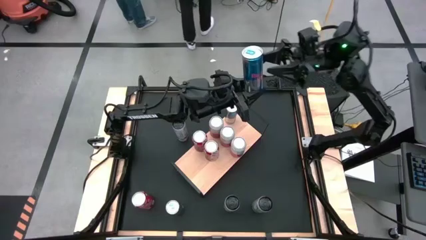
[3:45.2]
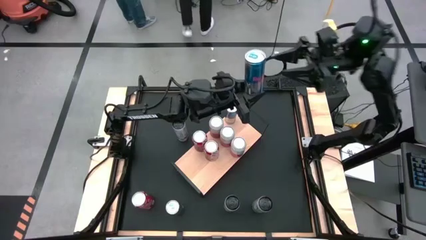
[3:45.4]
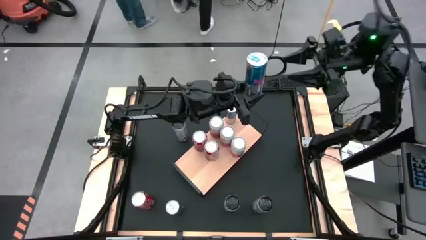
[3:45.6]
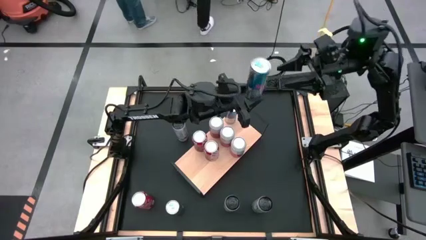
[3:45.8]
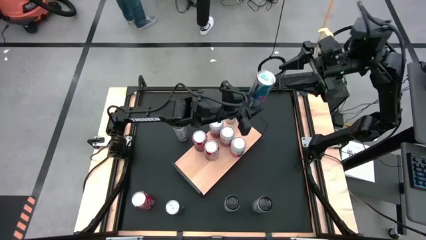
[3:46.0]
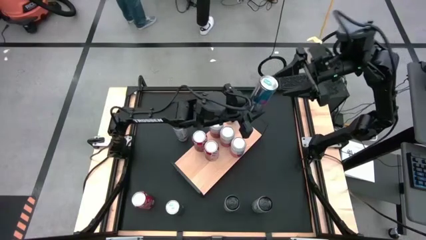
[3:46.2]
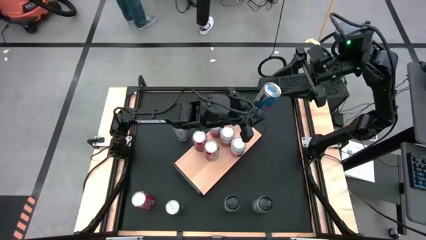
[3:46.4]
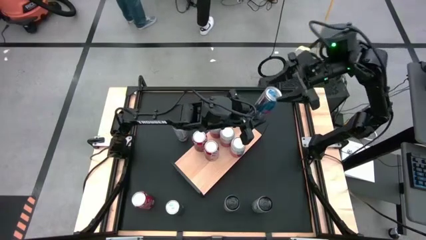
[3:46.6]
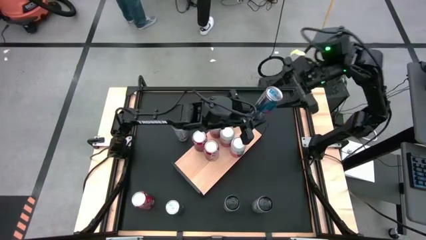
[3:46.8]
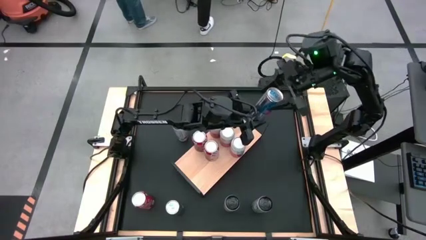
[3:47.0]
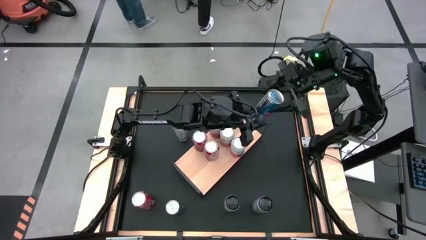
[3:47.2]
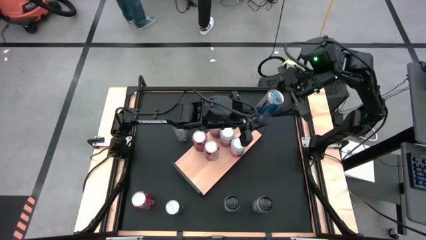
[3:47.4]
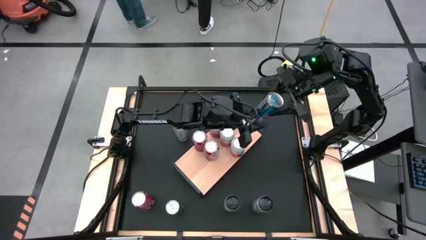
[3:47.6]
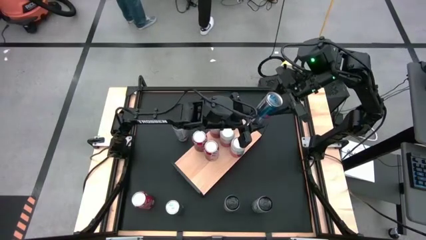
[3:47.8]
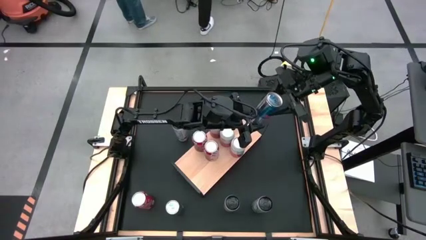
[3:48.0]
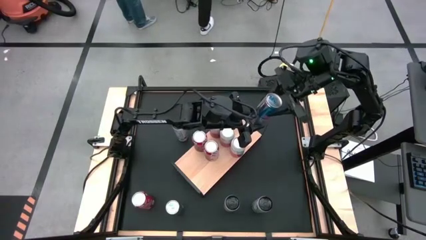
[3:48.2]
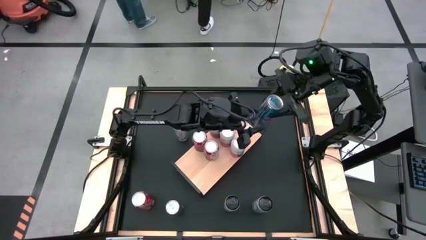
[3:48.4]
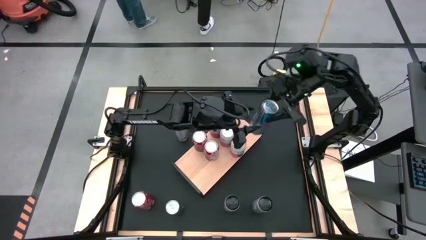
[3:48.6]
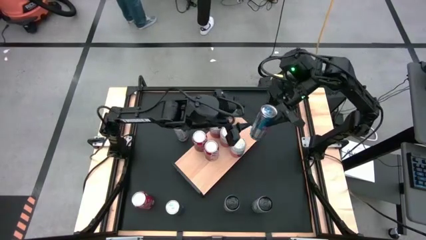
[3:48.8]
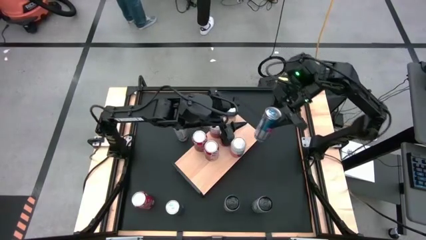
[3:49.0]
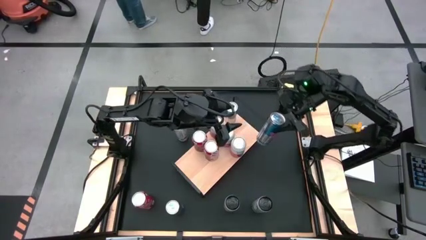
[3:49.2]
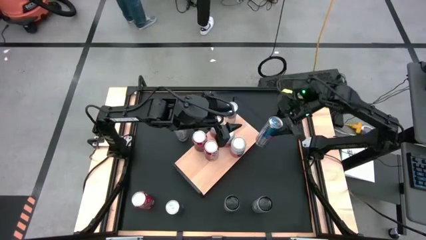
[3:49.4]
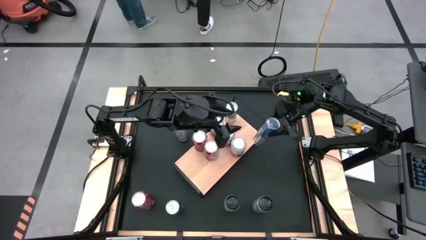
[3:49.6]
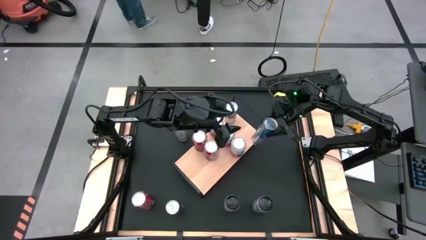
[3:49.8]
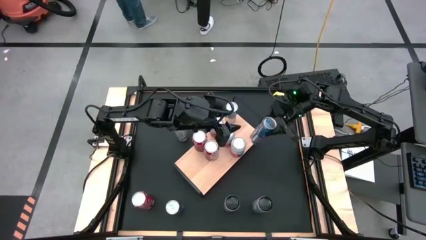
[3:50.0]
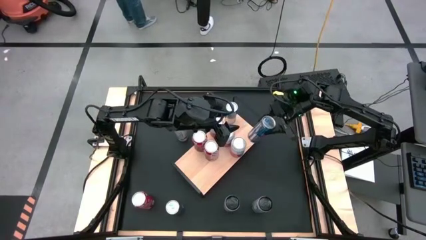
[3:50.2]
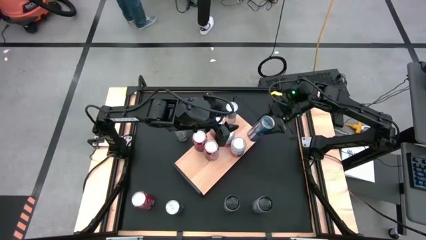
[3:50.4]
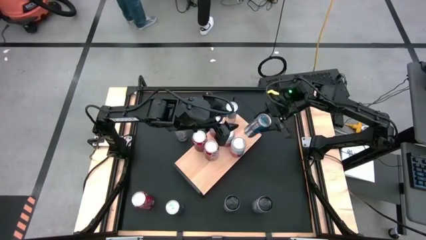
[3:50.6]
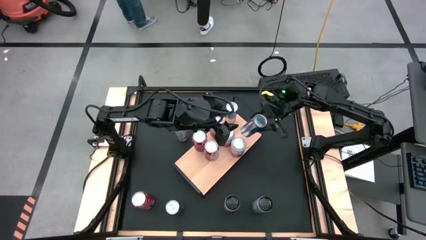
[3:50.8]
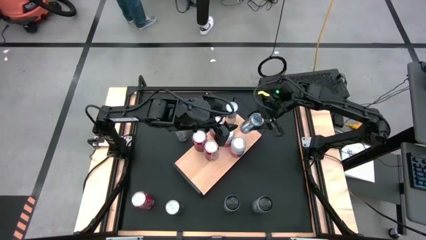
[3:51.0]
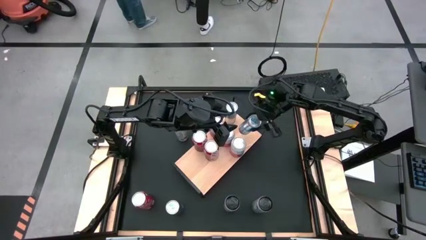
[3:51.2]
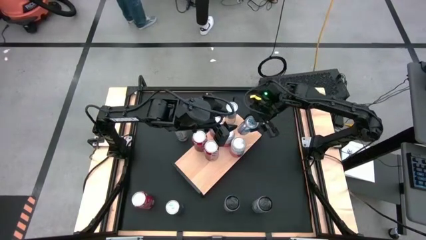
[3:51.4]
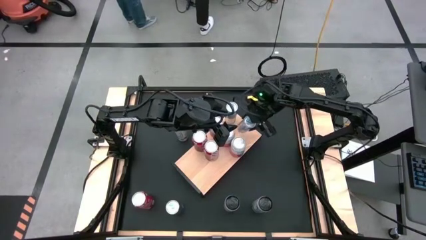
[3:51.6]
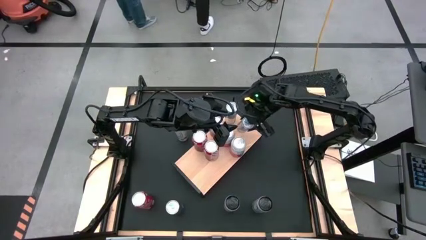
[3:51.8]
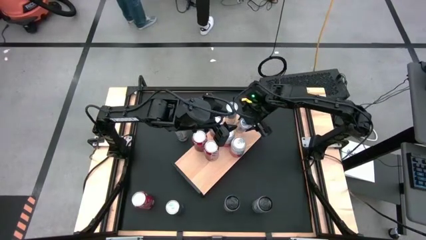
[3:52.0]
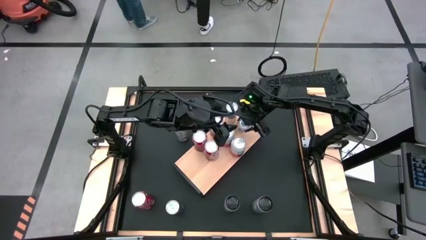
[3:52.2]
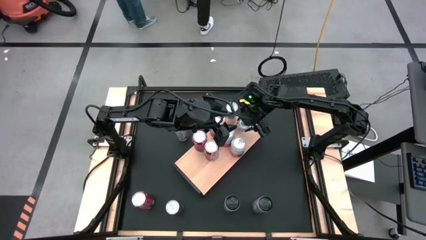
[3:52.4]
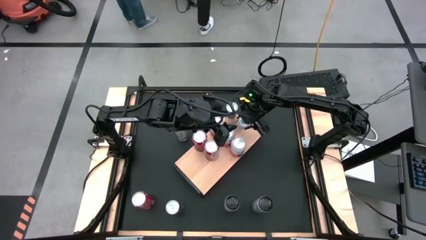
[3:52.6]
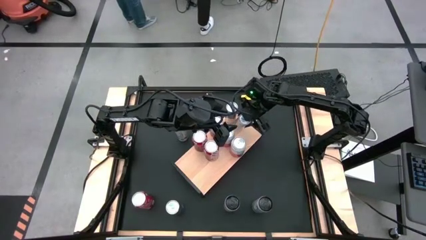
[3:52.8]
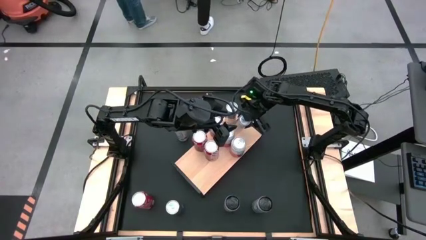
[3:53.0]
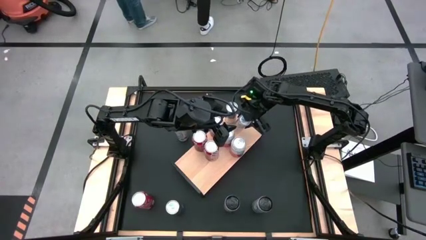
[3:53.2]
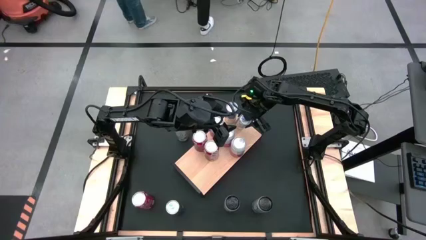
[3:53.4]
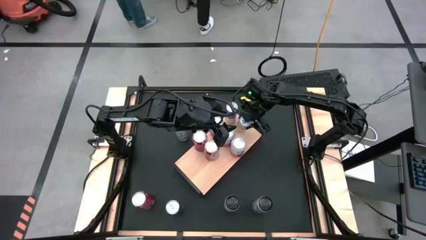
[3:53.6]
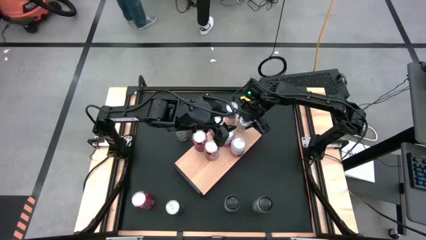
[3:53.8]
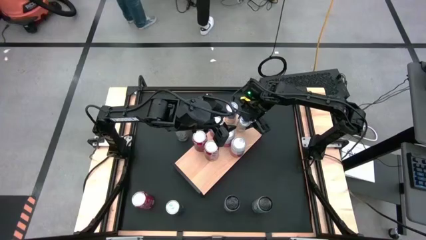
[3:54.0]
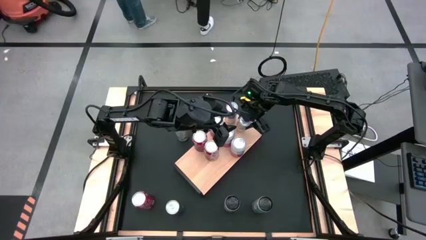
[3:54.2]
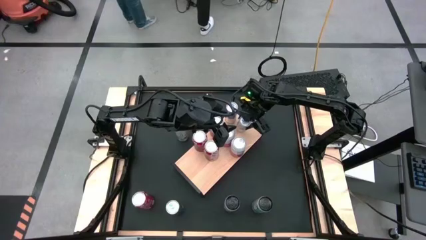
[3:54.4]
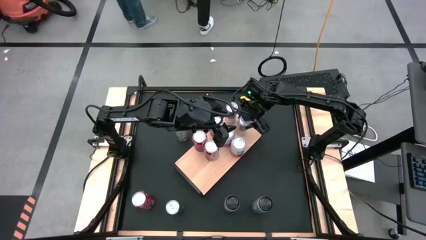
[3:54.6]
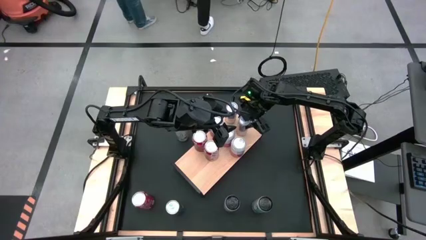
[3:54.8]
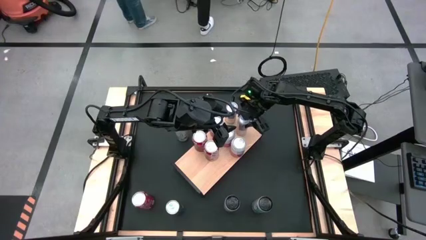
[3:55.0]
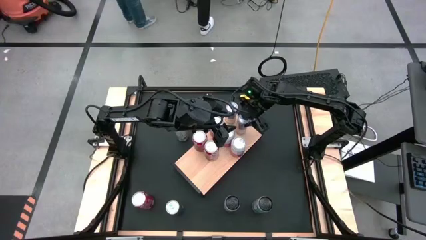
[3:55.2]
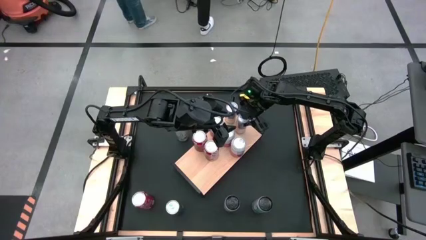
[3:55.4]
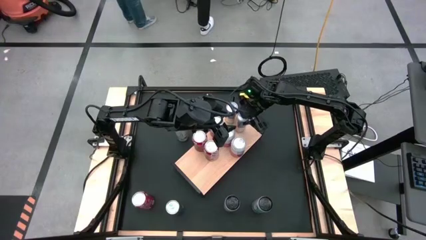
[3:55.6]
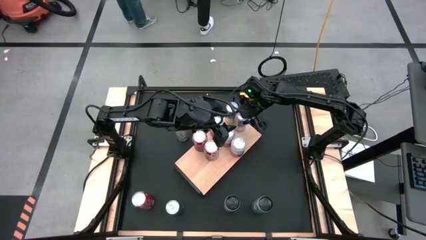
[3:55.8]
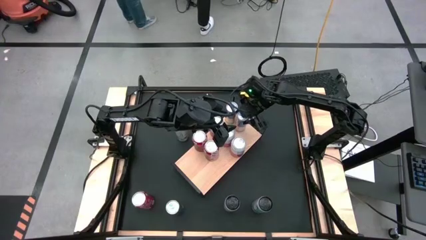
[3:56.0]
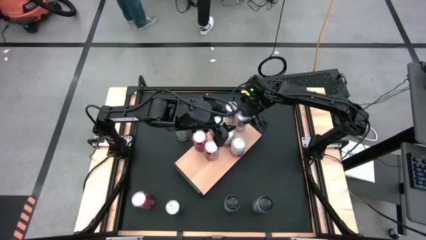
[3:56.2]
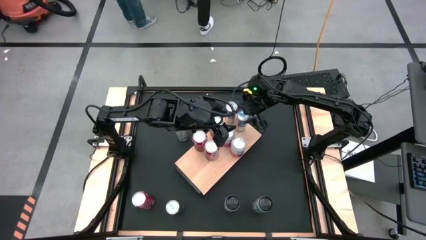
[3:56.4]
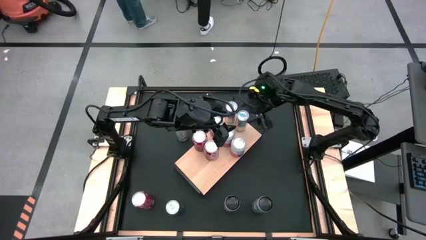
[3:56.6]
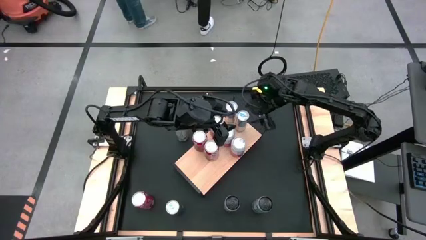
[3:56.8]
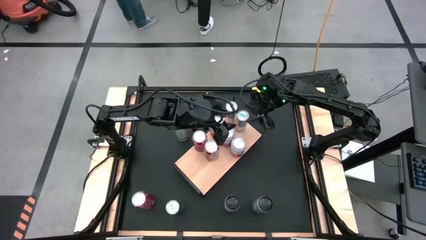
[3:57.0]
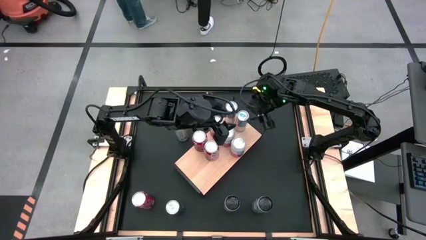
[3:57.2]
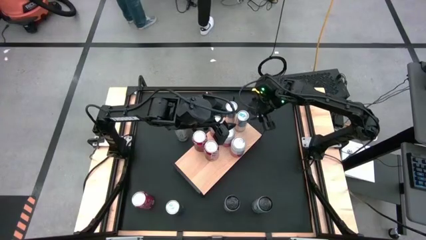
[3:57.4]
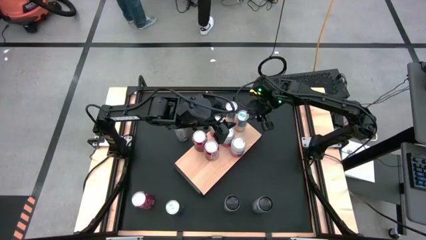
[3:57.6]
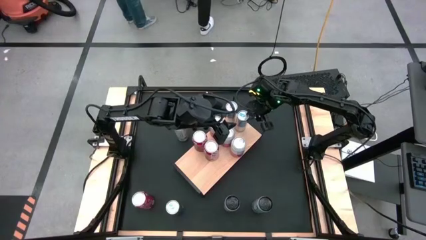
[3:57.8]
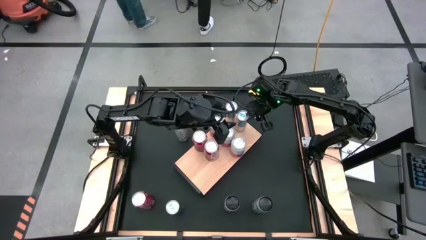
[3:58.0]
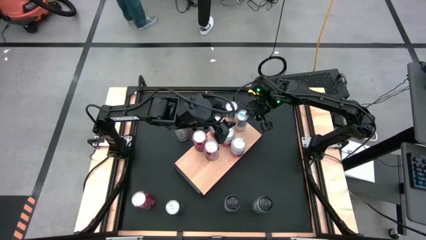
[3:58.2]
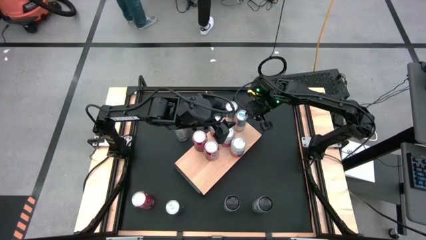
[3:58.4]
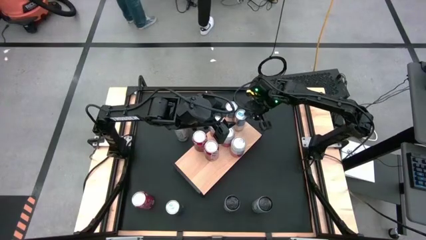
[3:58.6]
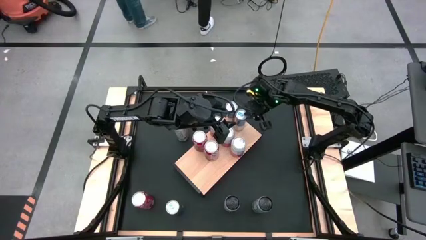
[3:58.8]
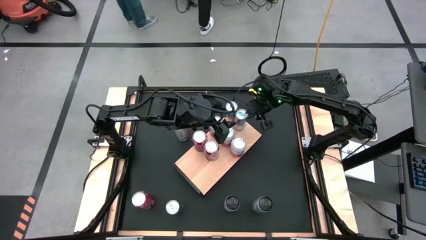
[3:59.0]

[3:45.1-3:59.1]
Task: Place canned beverage on shelf
Put the top blue soda can on the shelf
